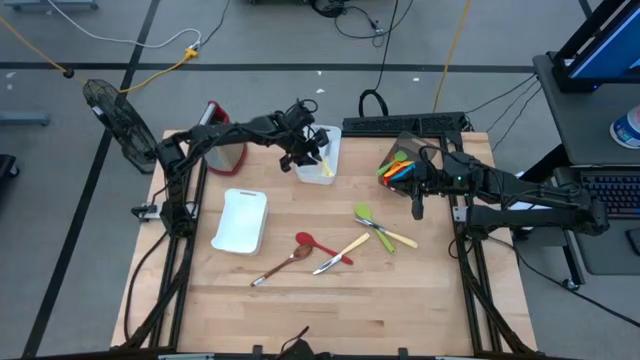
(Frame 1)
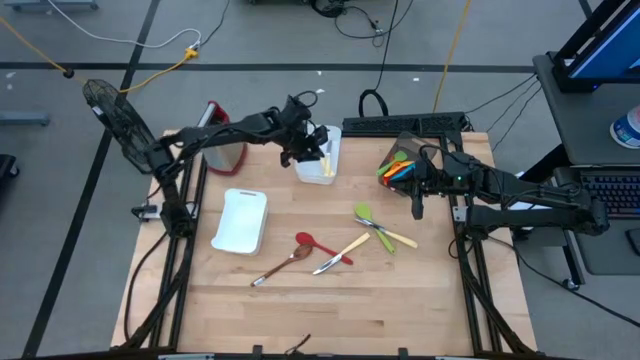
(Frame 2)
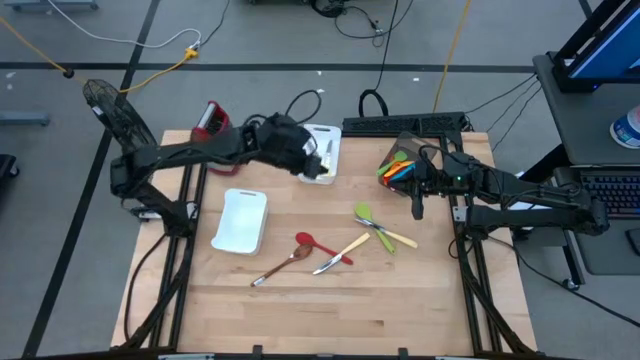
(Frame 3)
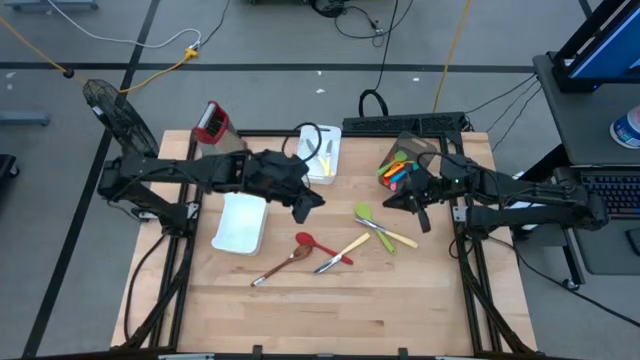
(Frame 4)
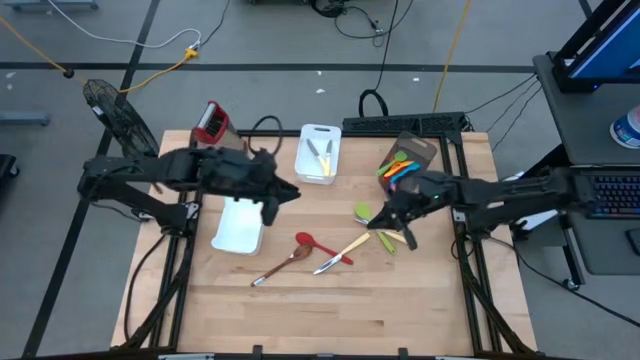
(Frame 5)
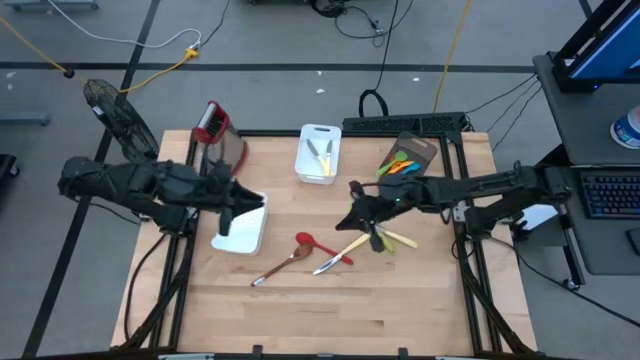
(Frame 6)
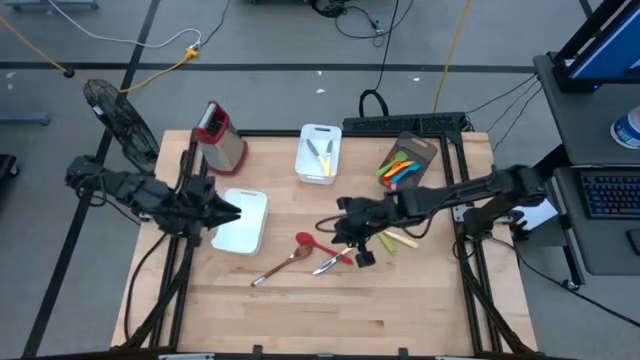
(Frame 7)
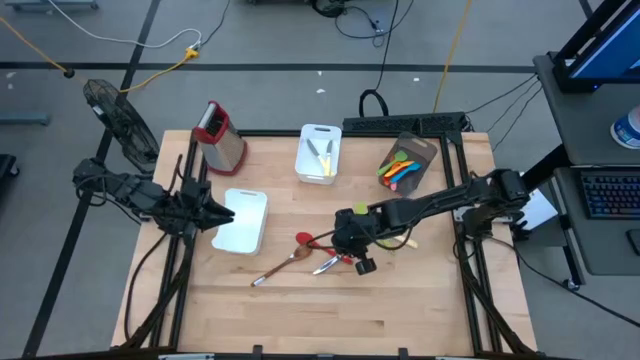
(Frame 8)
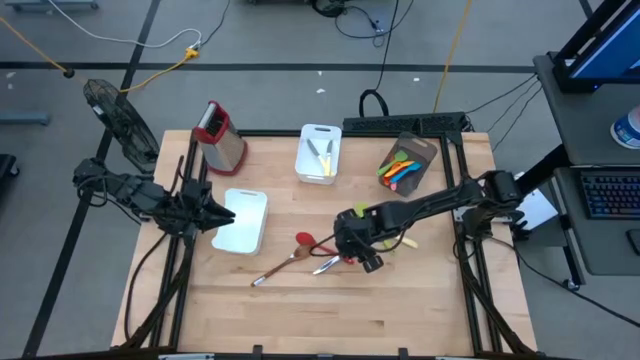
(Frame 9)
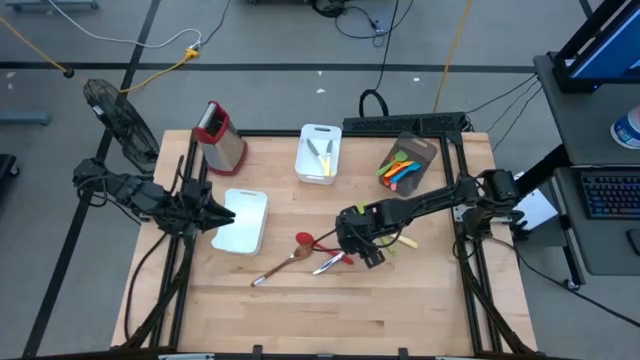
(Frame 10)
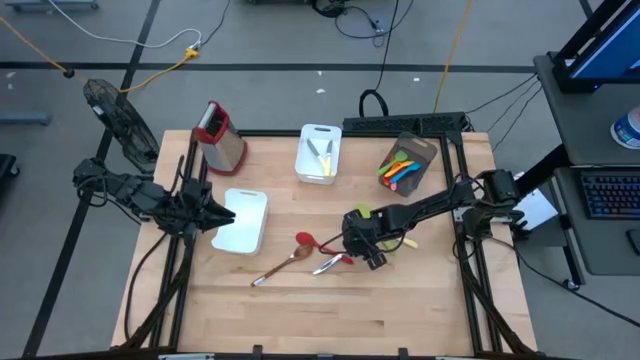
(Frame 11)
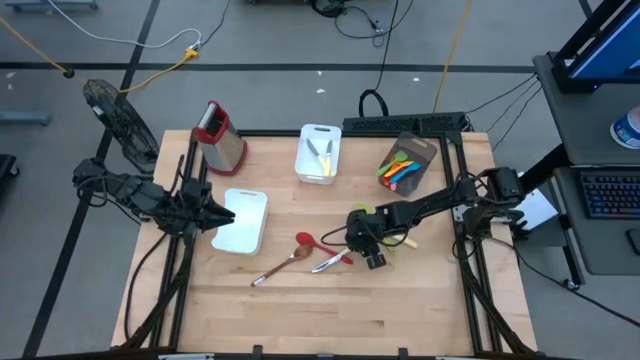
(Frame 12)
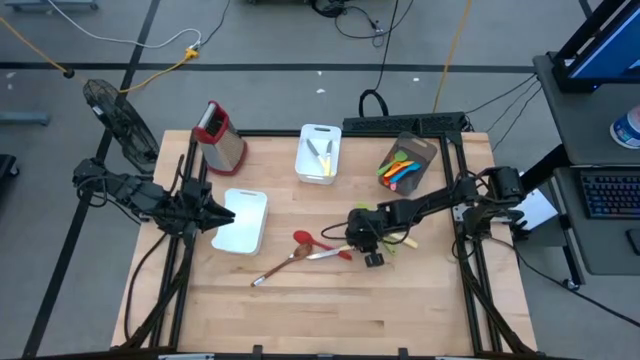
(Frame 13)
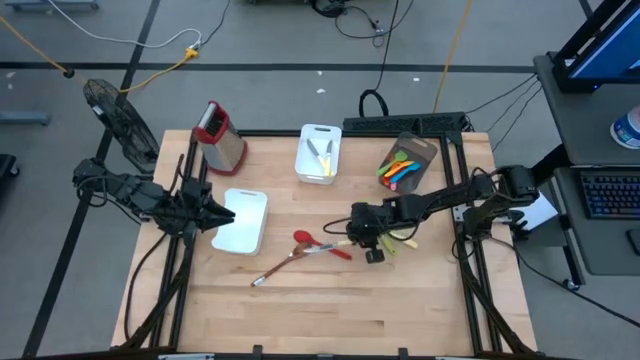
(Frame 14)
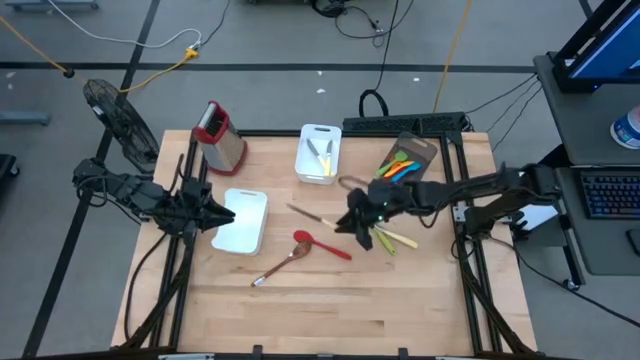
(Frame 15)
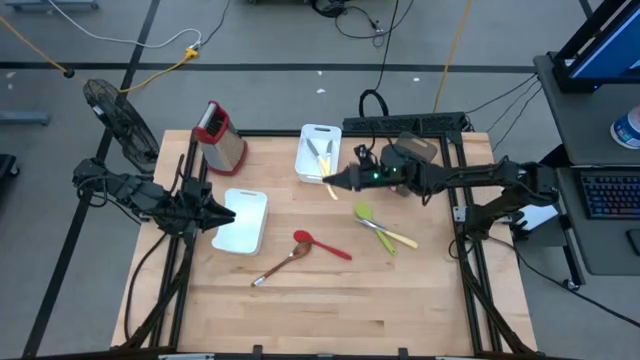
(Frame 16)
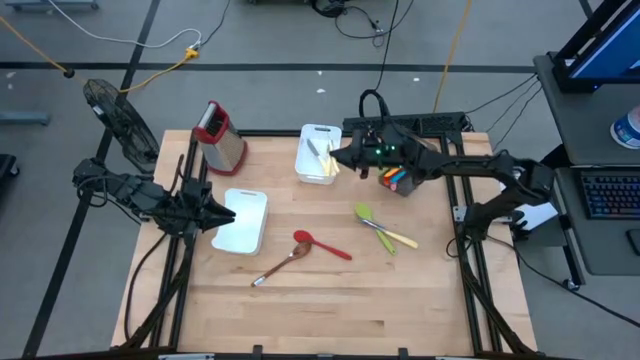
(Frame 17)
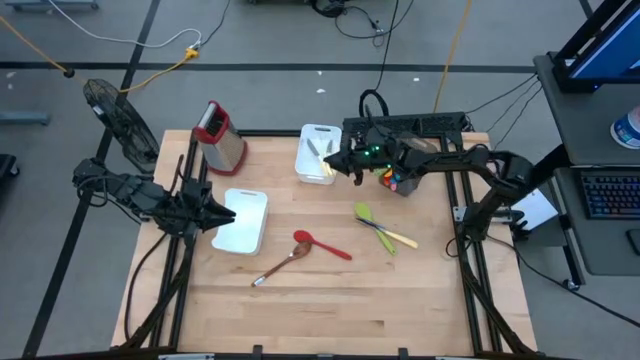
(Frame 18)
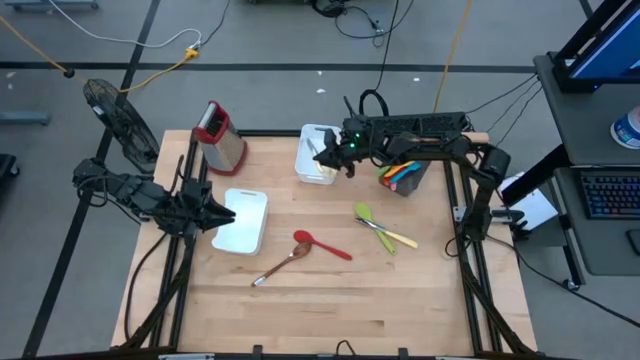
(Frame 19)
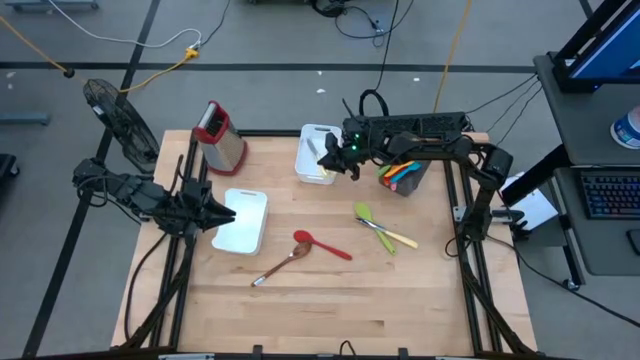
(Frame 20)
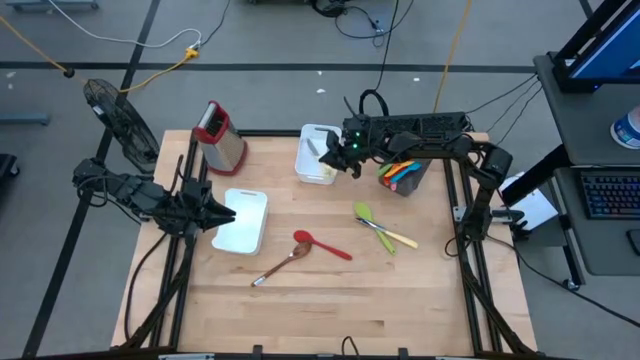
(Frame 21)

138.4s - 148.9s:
Task: Pick & Place Kitchen Items
Put the yellow table knife into the top white bin

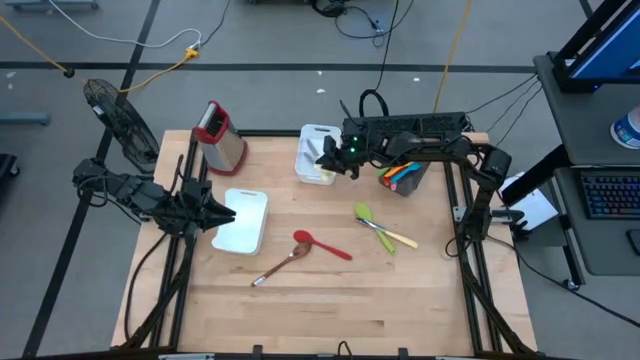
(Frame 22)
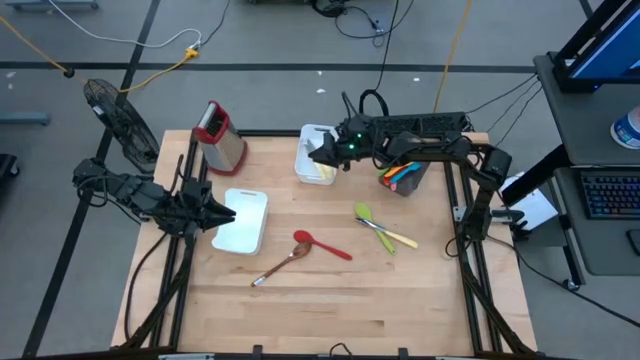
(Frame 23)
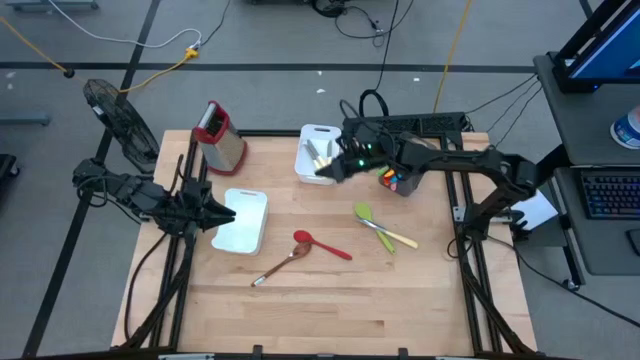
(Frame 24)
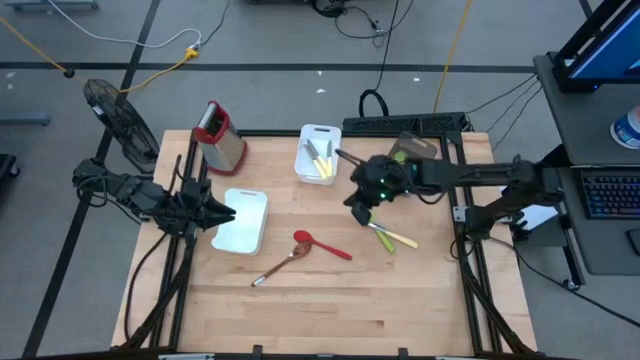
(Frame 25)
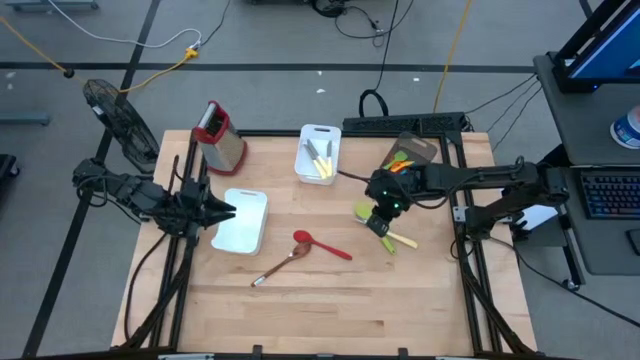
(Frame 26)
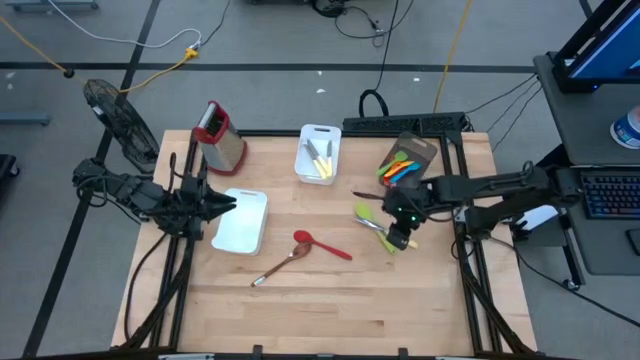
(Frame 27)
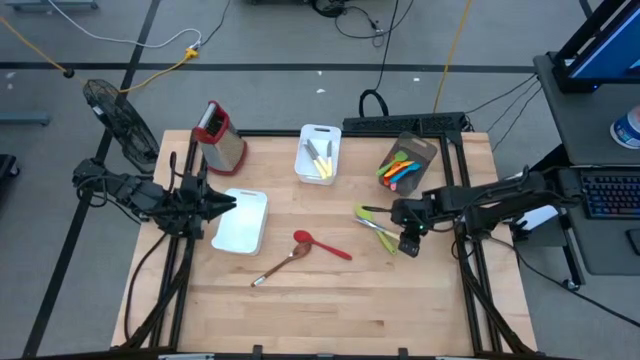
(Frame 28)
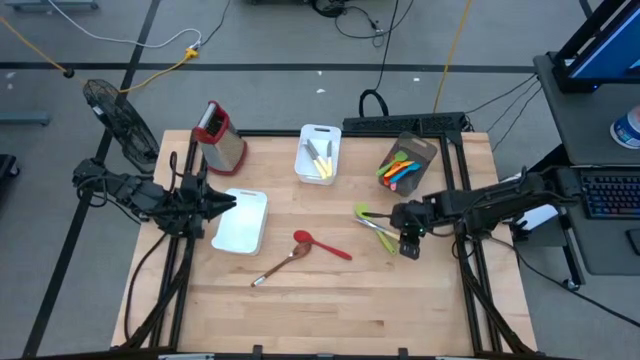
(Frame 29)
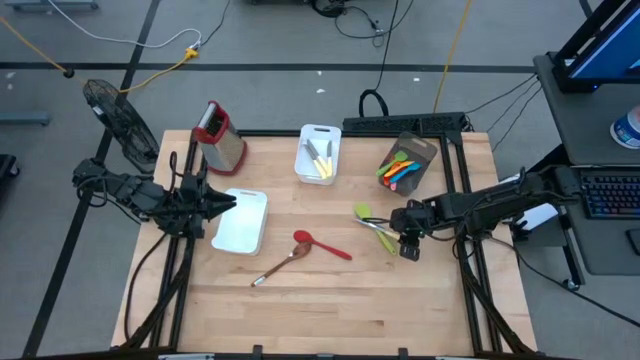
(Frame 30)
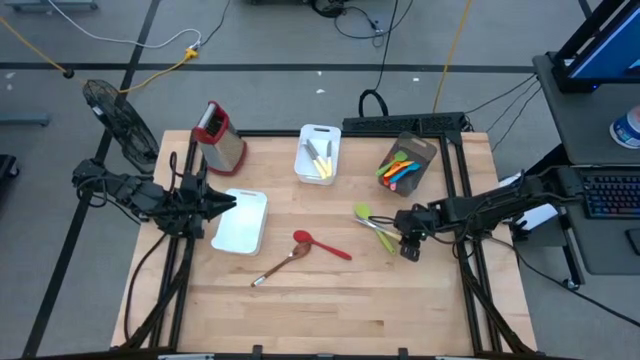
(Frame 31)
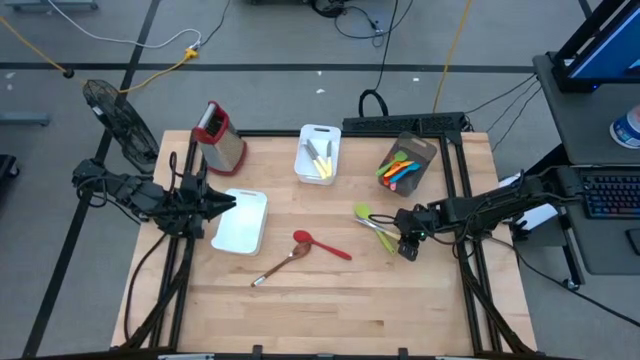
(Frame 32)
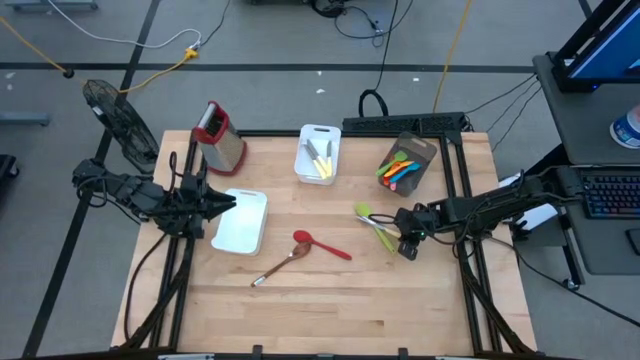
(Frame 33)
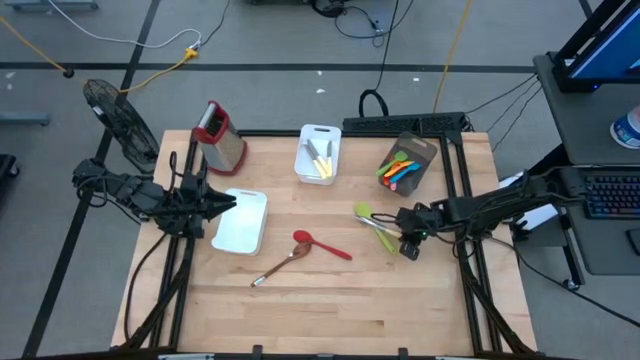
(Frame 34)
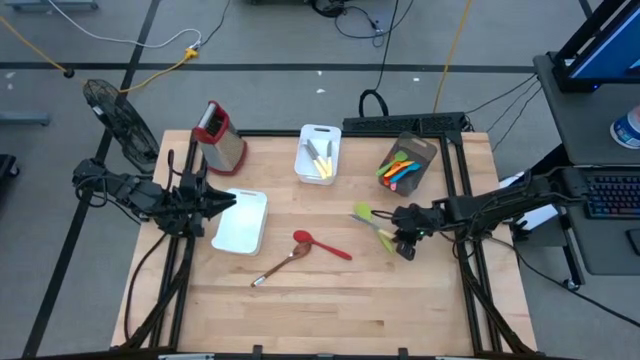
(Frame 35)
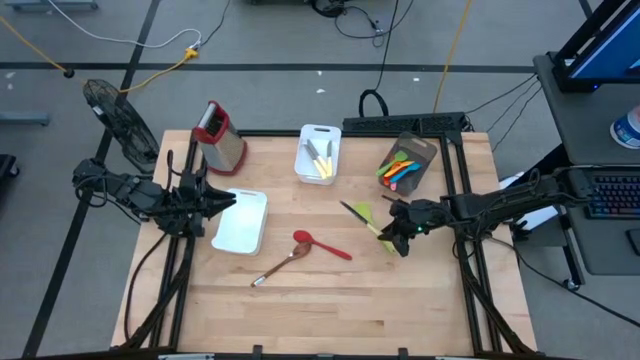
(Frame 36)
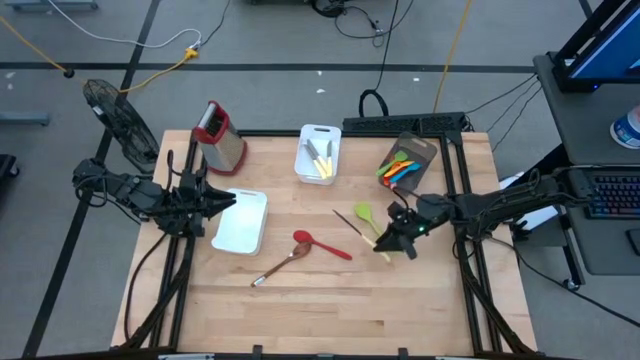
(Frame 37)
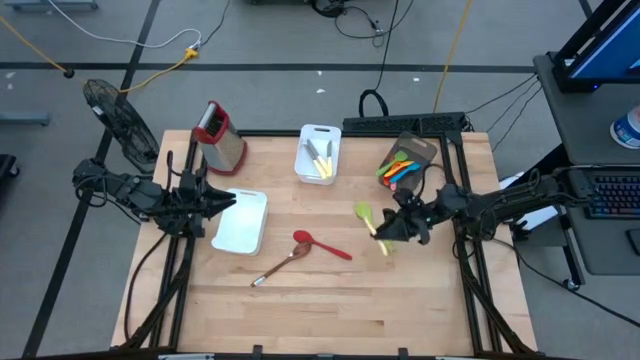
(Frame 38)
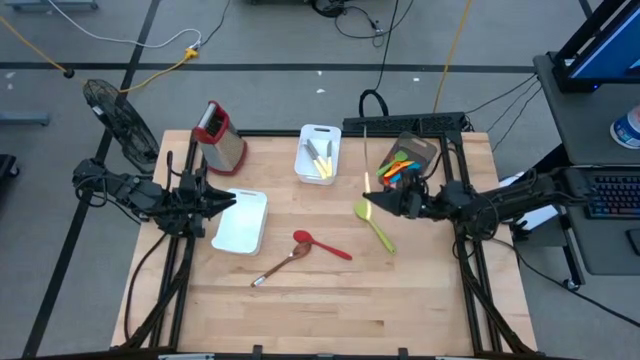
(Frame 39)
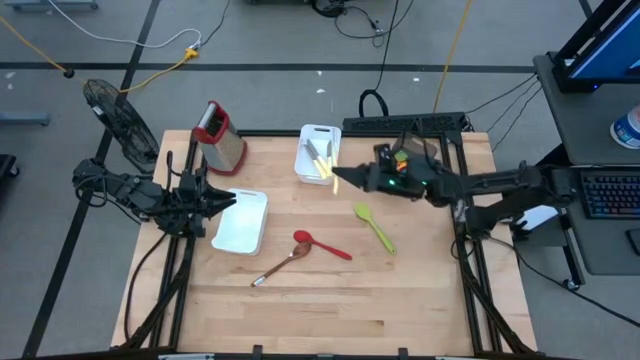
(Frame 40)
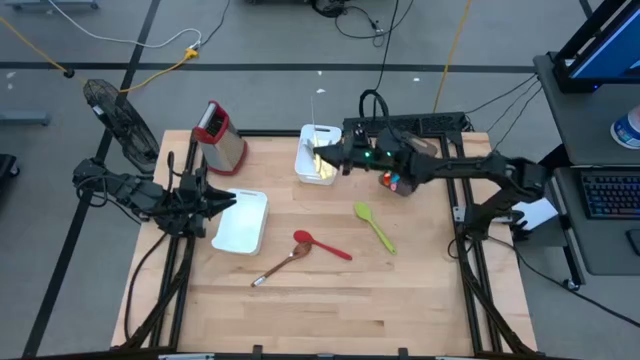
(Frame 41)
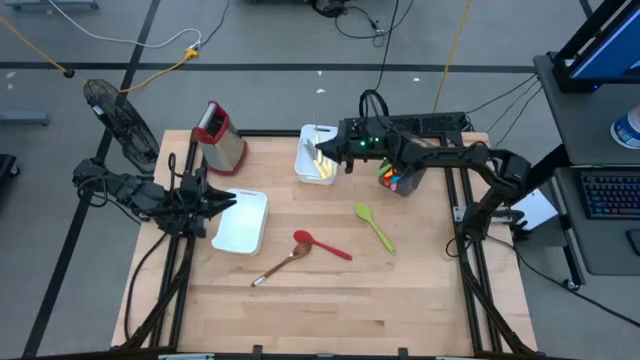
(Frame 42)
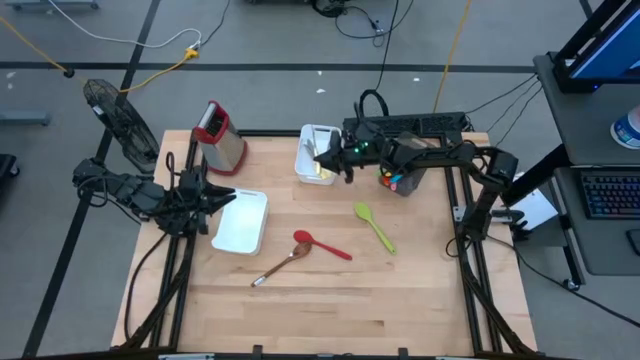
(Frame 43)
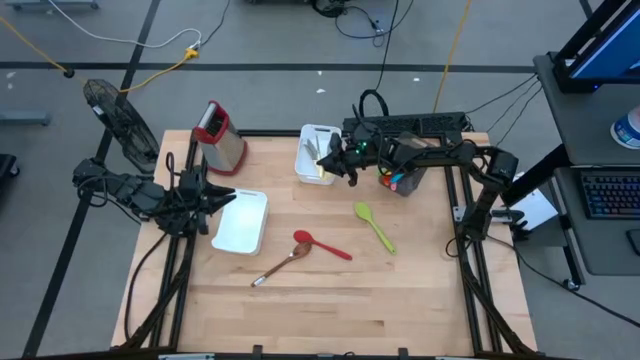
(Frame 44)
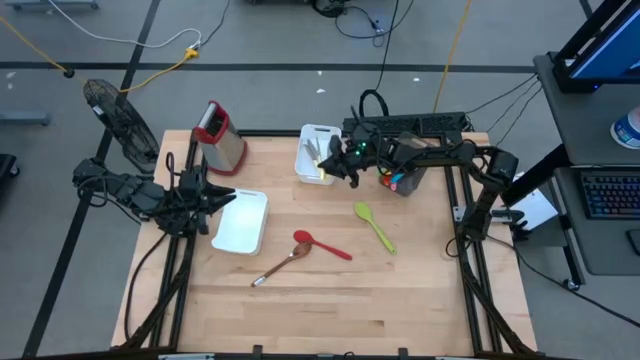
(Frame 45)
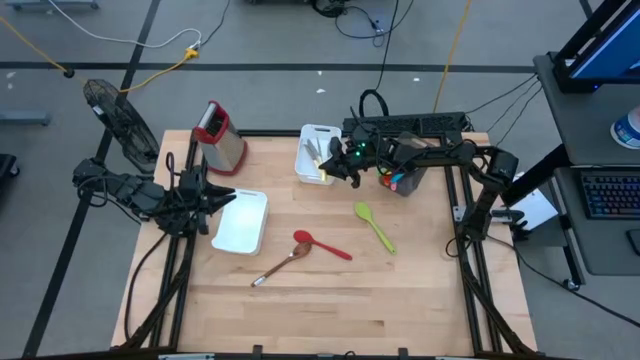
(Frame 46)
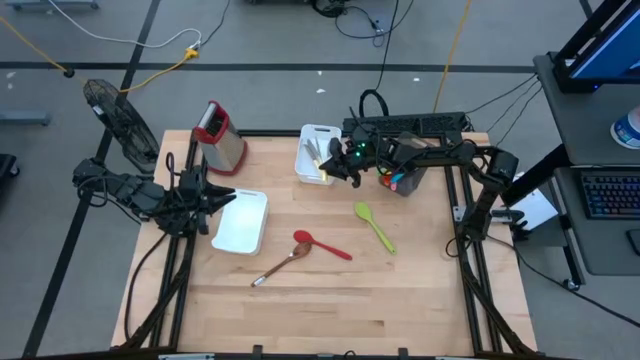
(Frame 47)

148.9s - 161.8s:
Put the yellow table knife into the top white bin
